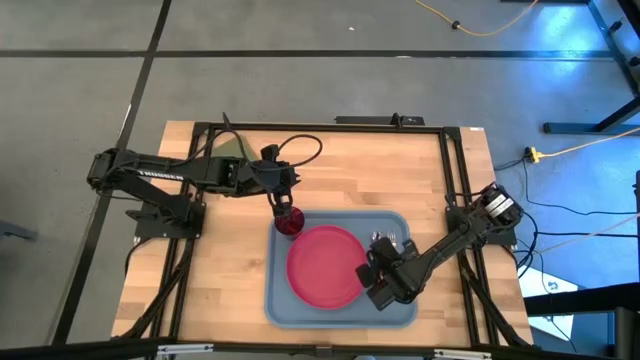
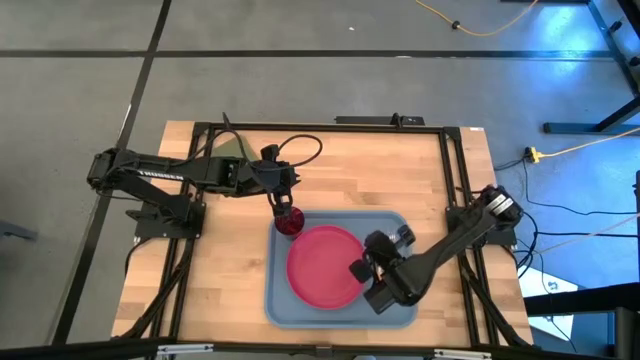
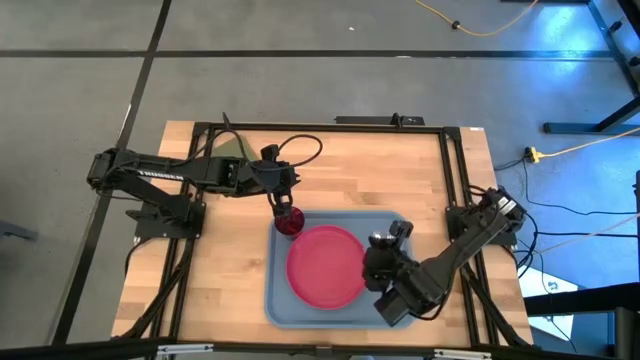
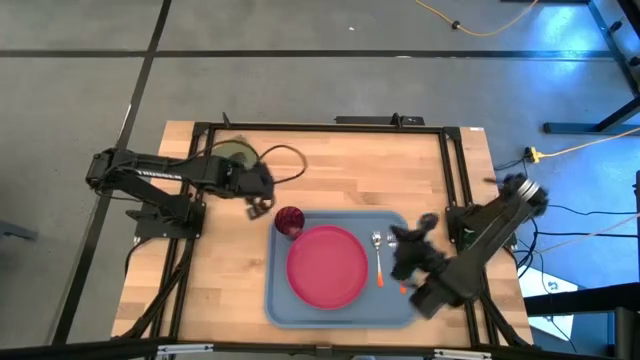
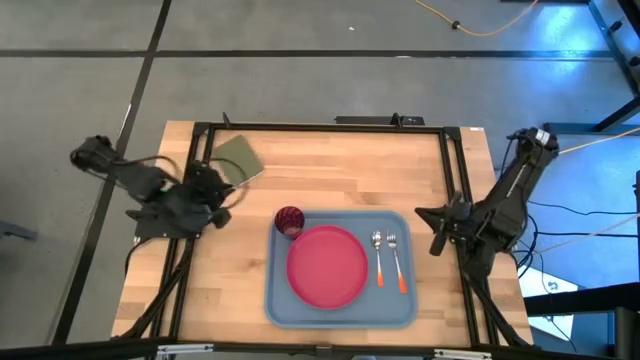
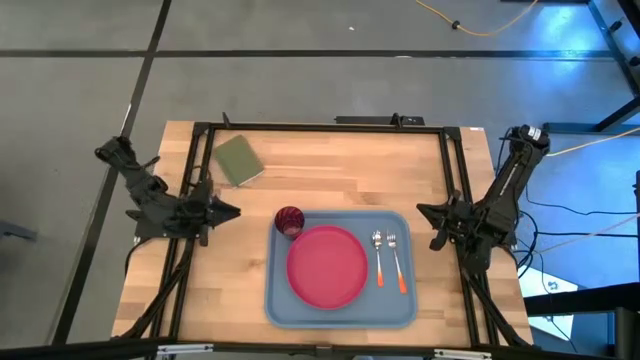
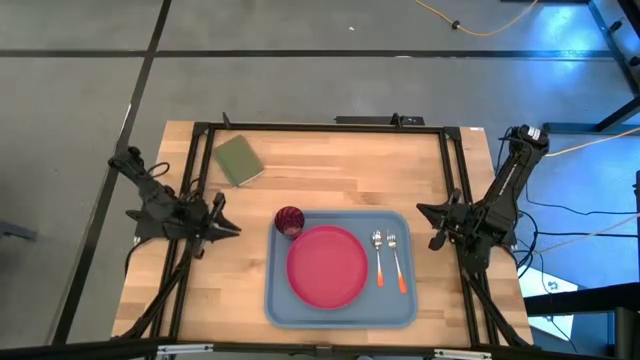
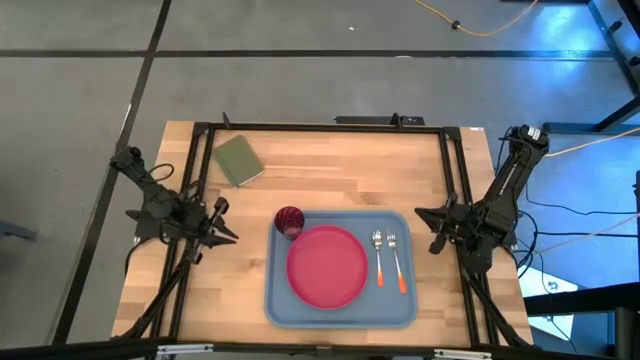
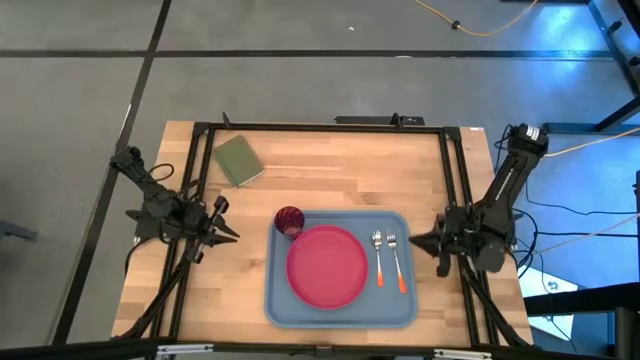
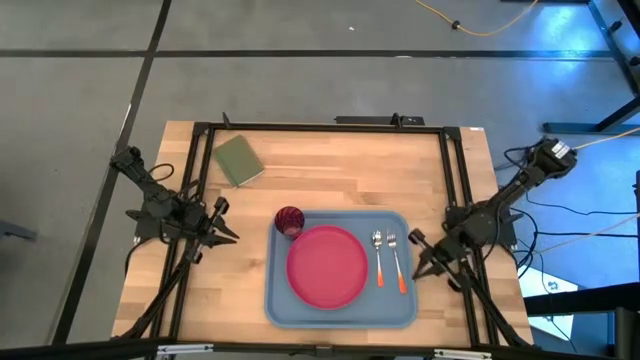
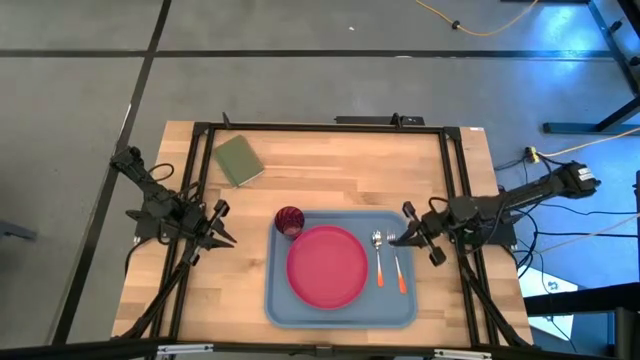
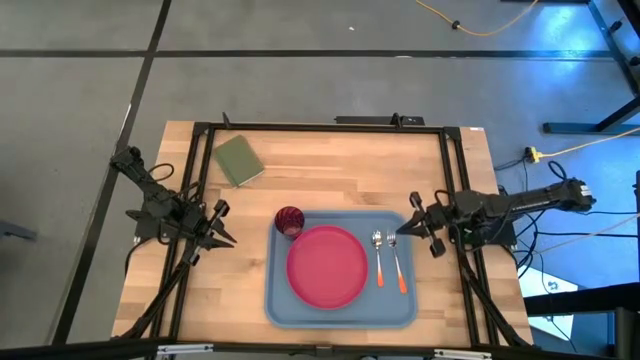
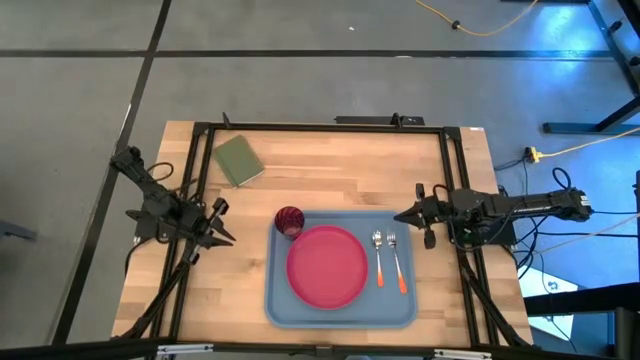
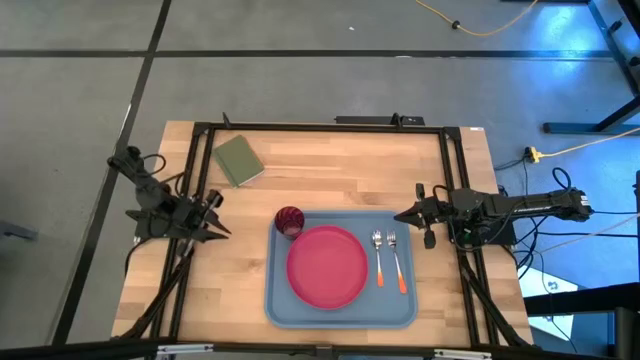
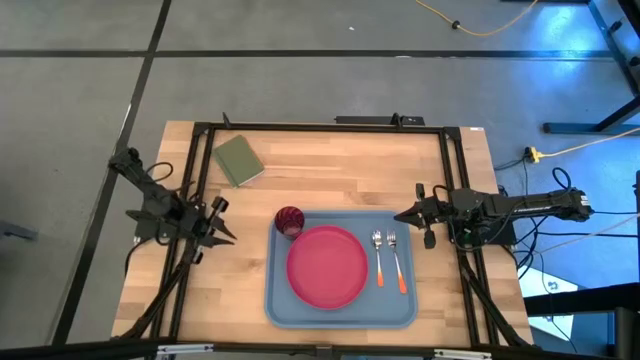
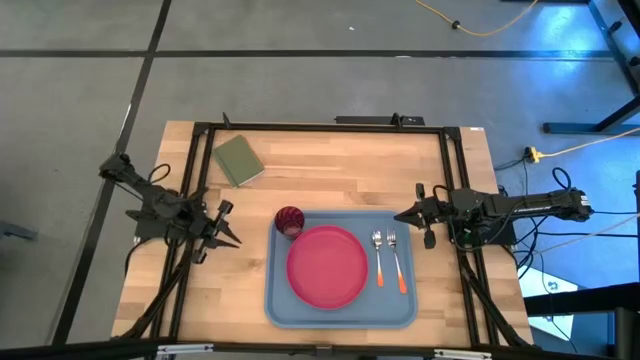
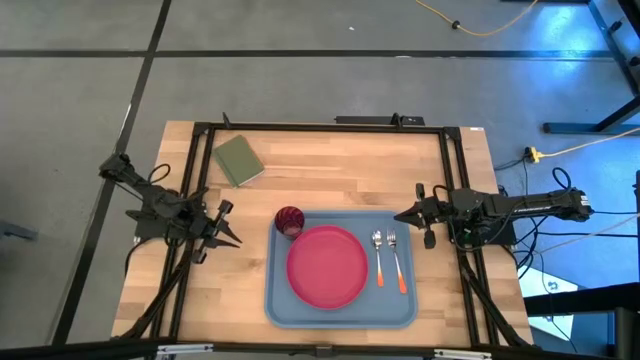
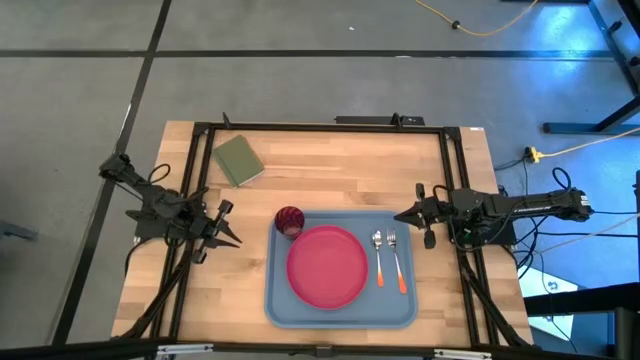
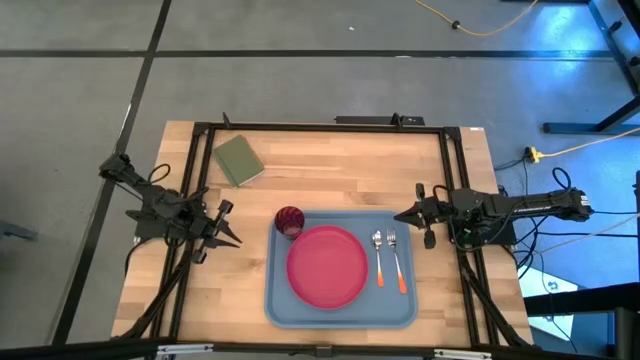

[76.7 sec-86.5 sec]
Task: Pick and place plate/cup/fork/spoon on tray
Return to Home Position

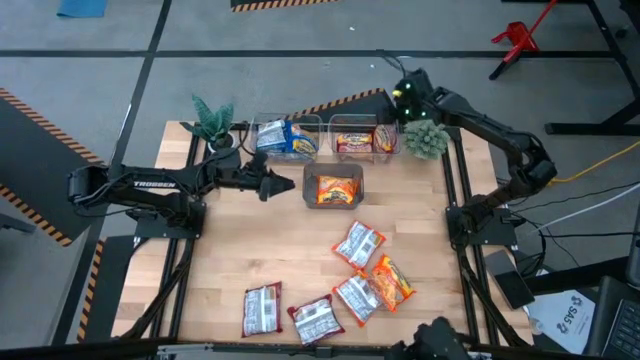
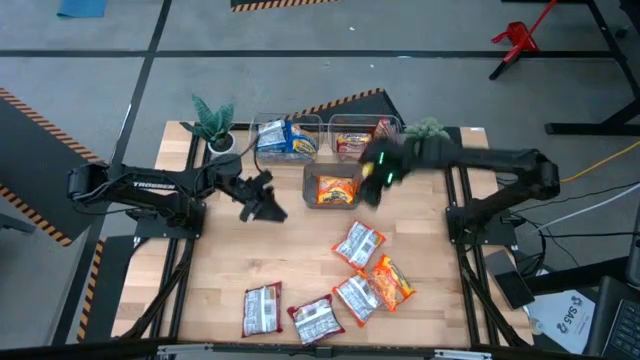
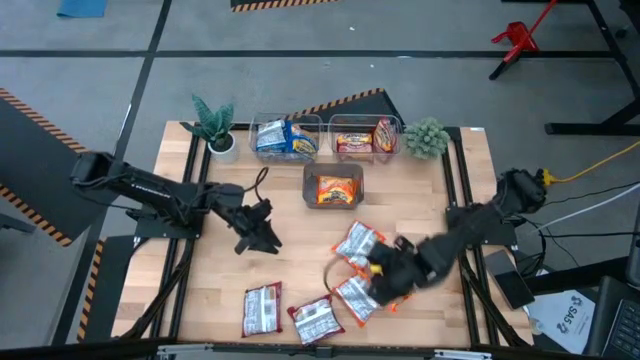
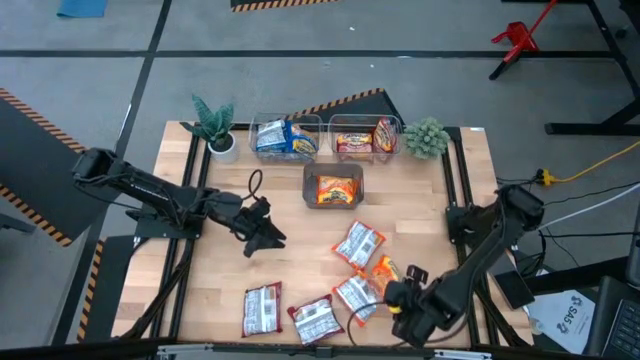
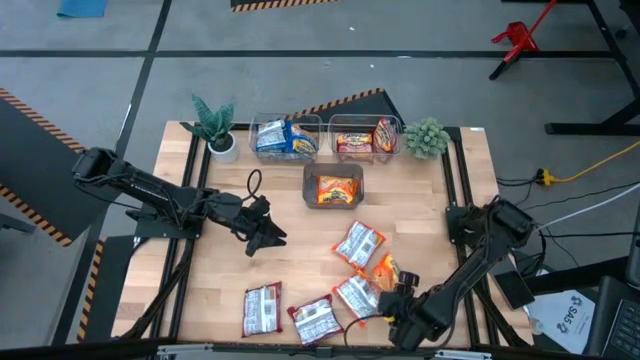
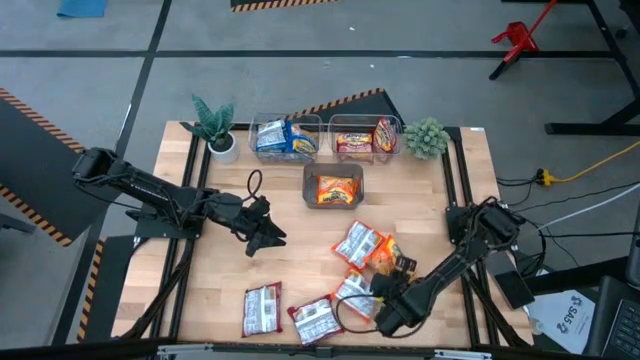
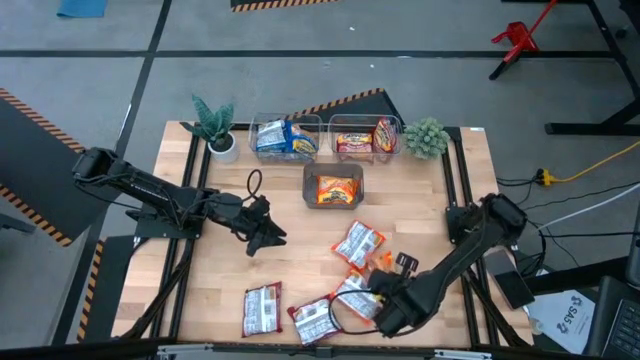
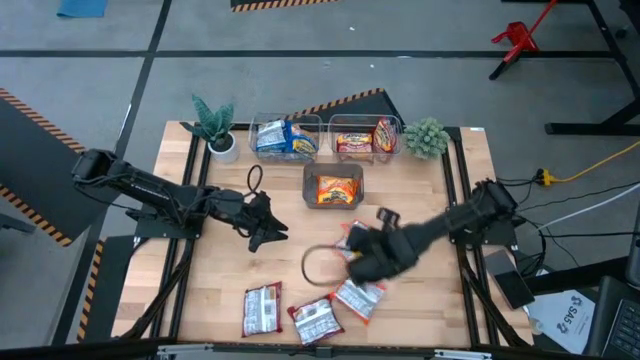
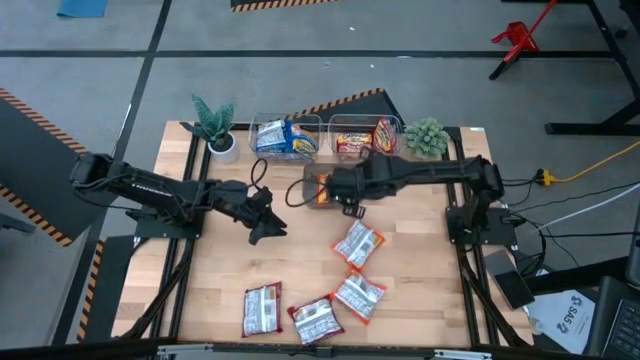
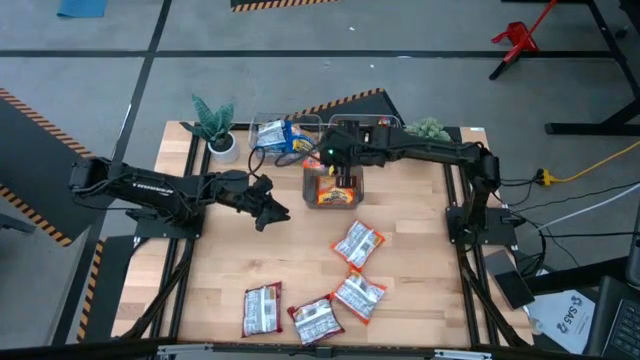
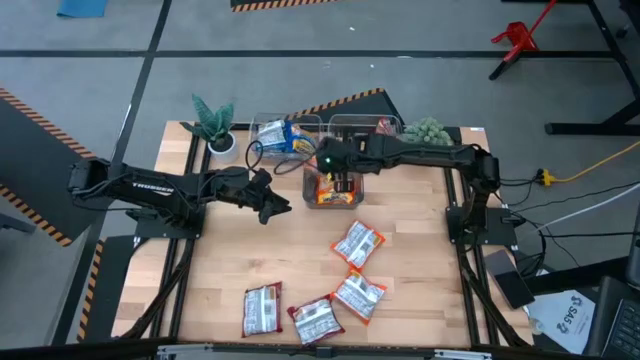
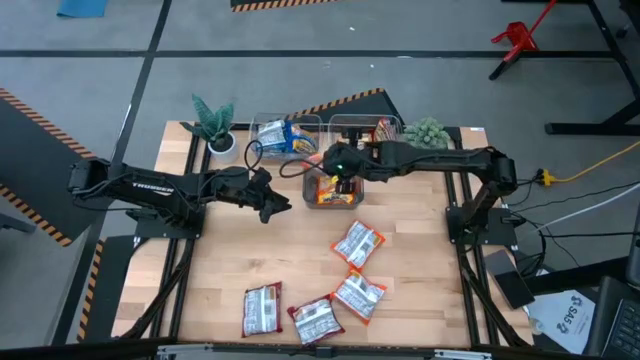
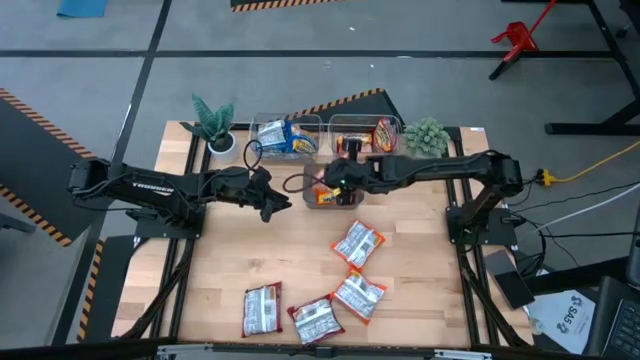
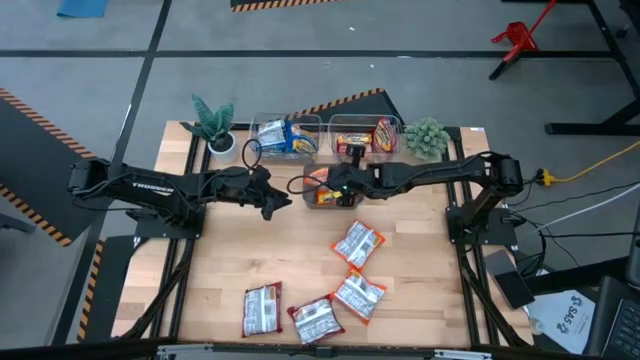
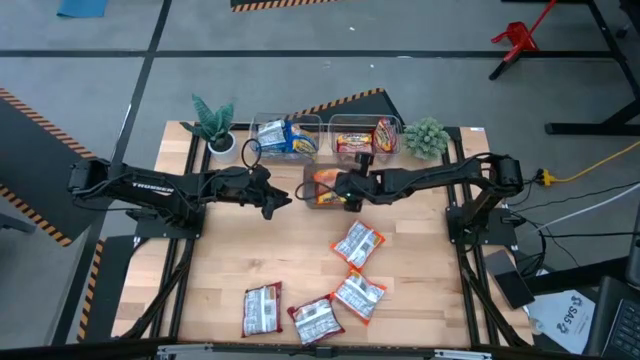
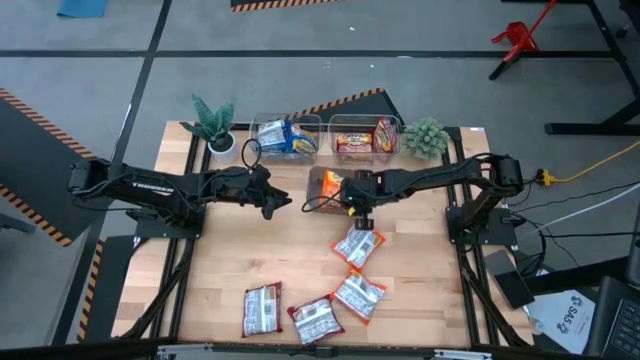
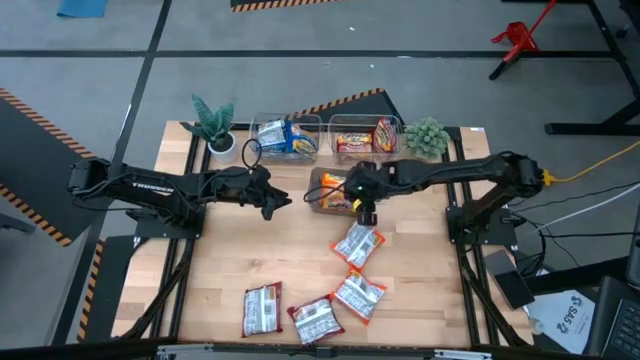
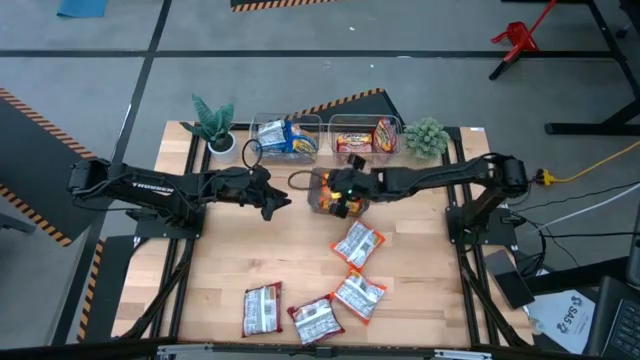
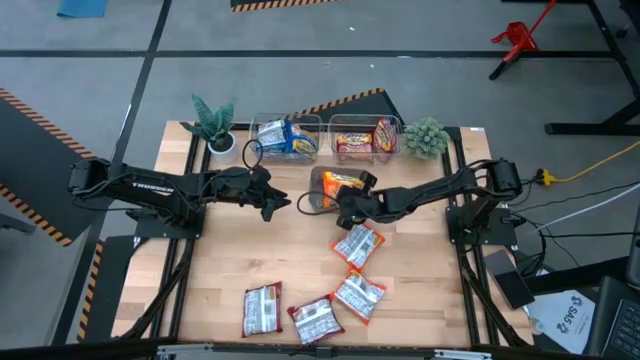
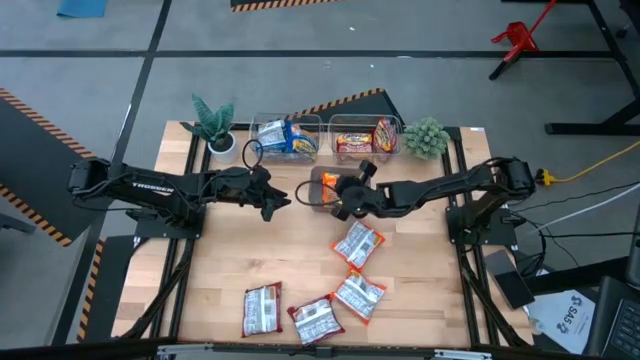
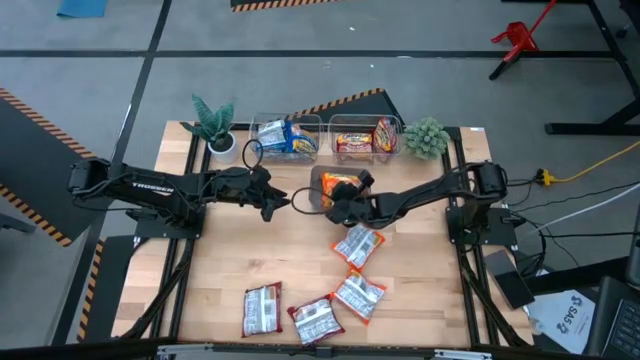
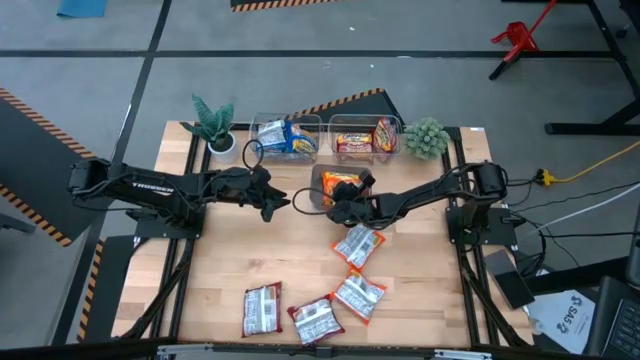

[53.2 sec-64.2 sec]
Task: Sort Maruchan noodles
Put the orange noodle pack into the black bin
